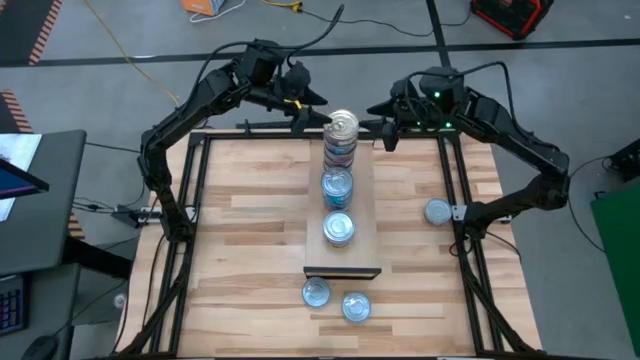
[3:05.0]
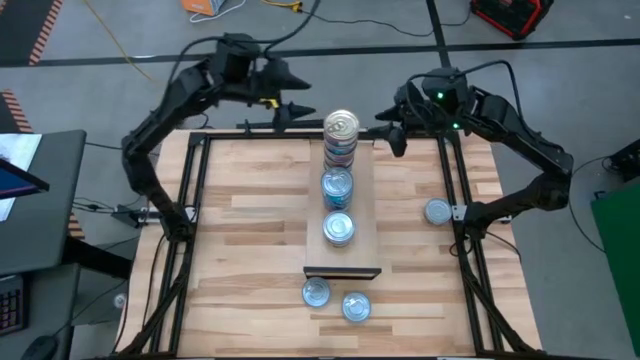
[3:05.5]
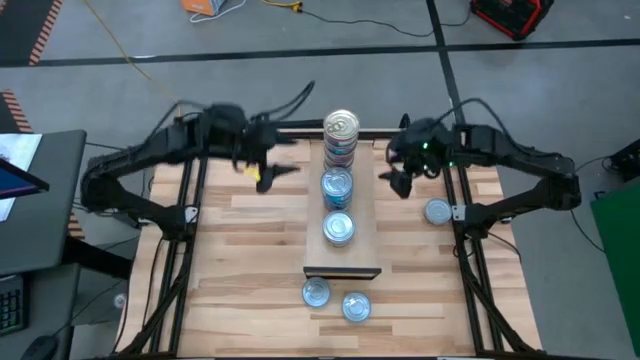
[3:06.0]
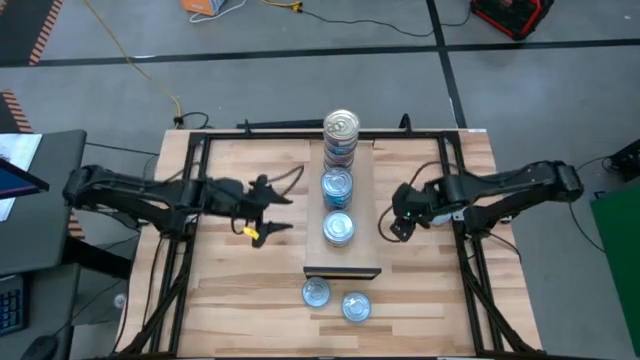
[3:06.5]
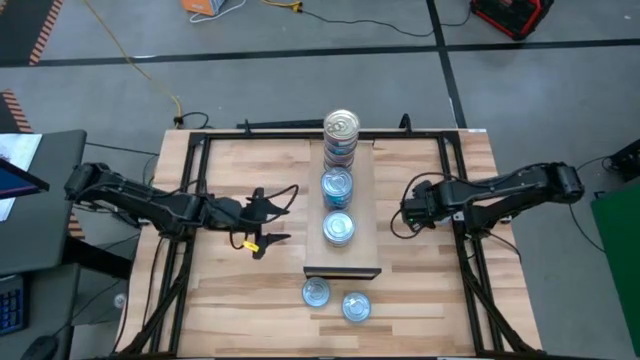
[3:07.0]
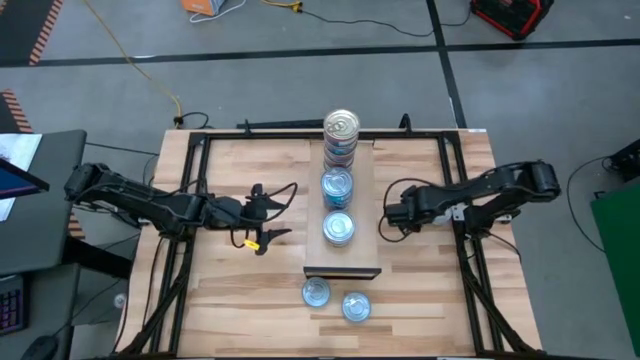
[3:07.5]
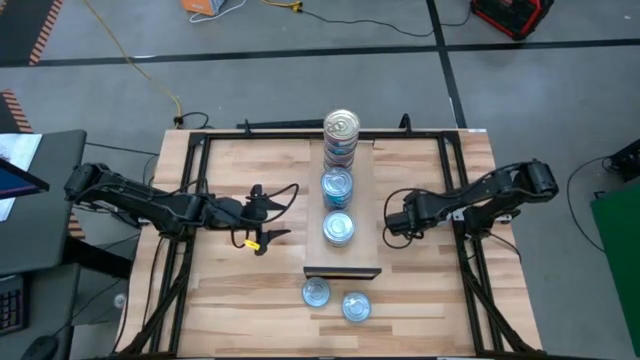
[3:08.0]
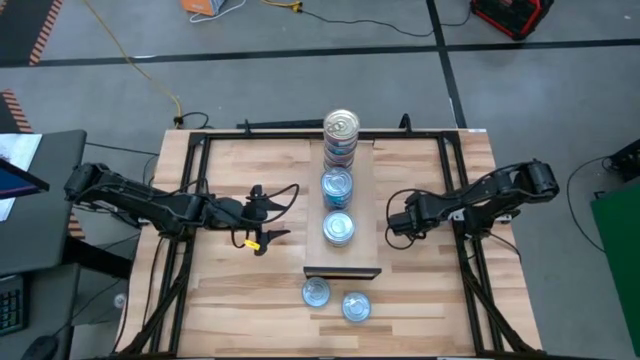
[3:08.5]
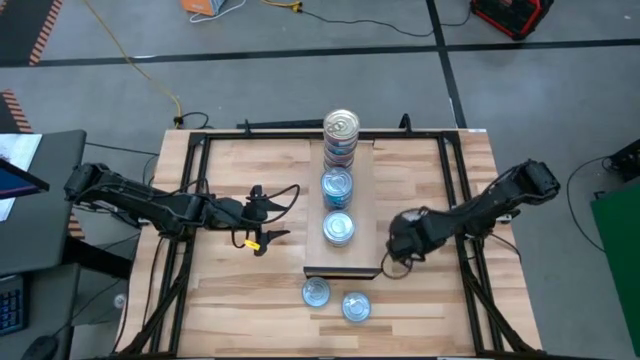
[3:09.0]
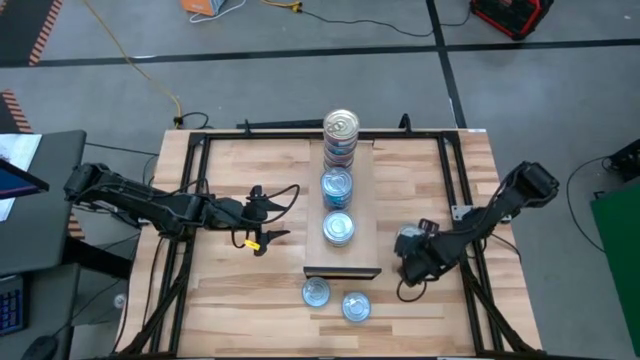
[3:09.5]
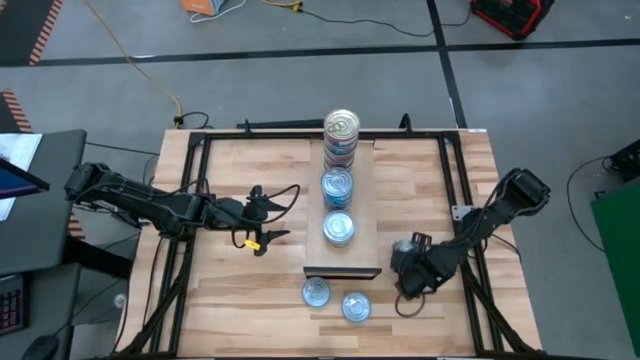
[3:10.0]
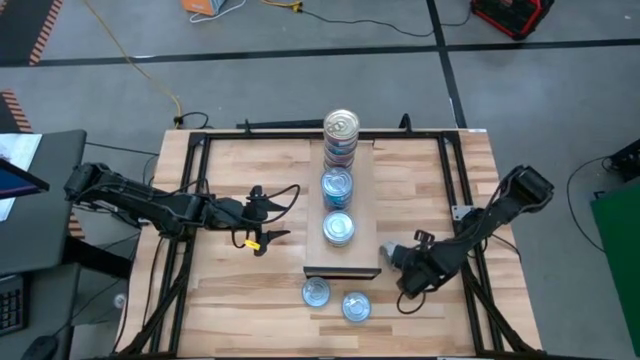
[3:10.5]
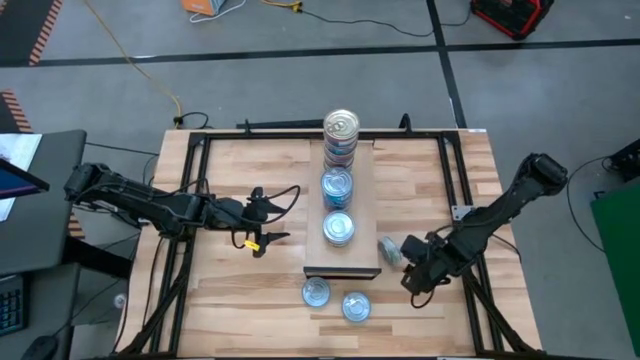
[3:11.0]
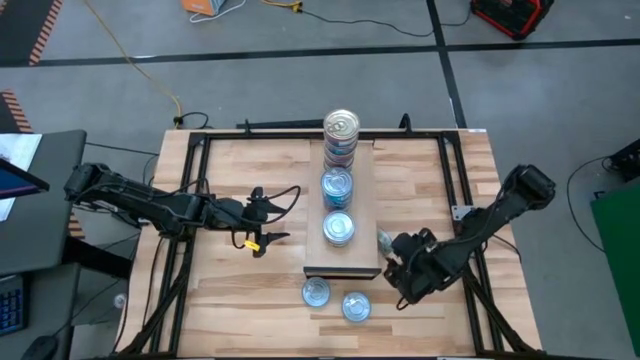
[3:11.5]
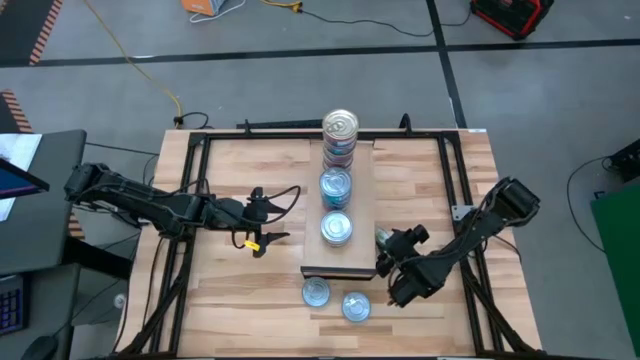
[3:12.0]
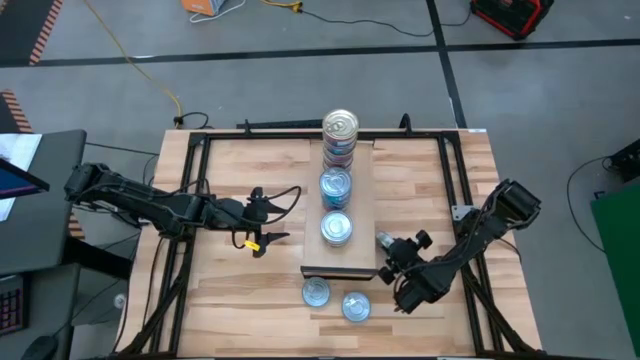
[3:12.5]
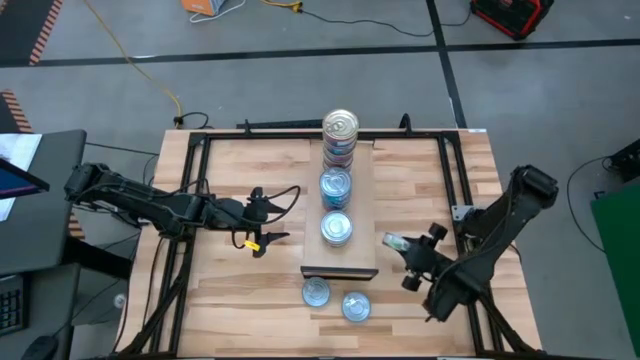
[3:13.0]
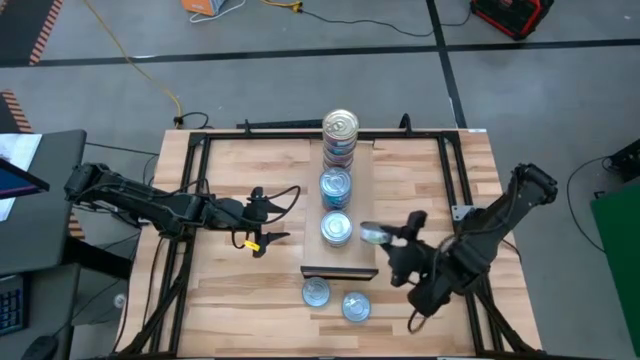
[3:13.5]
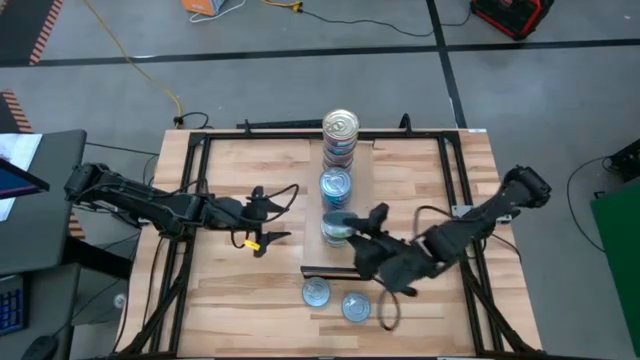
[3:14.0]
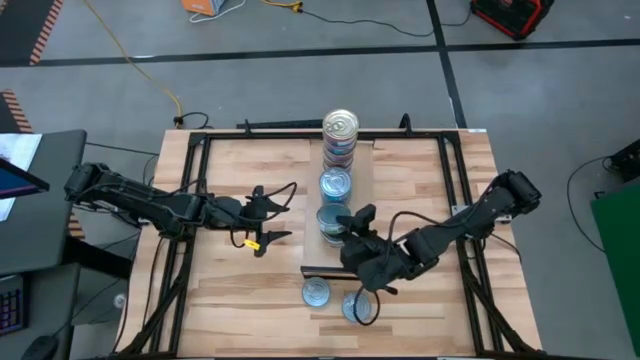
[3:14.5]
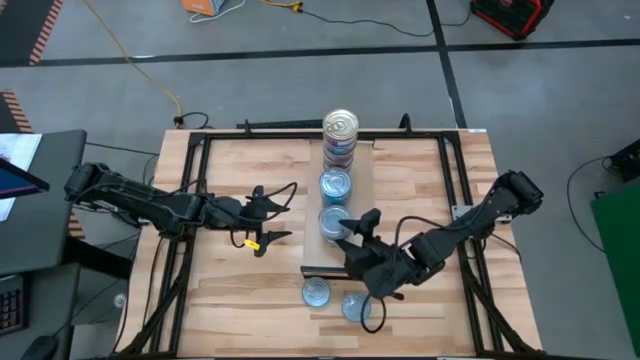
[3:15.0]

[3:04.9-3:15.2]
Task: Stack canned seafood by type on shelf
Stack the green and white tuna can on the shelf on top of the other green and white tuna can

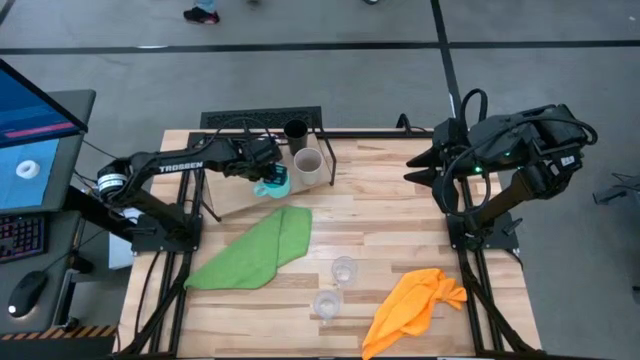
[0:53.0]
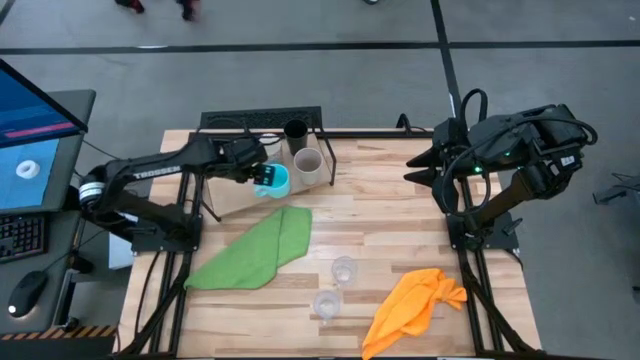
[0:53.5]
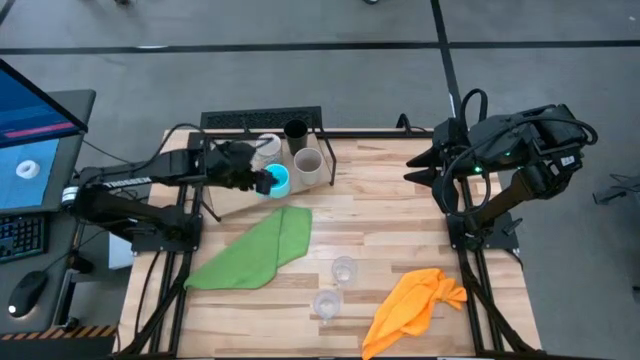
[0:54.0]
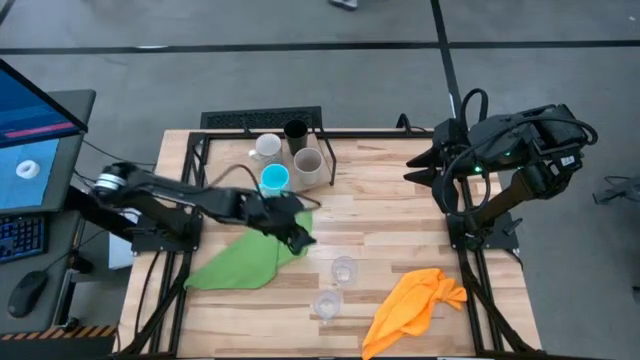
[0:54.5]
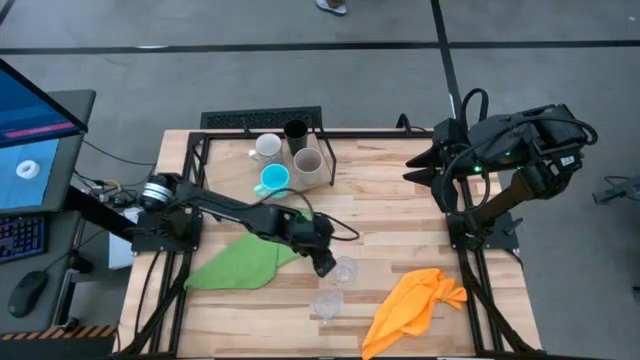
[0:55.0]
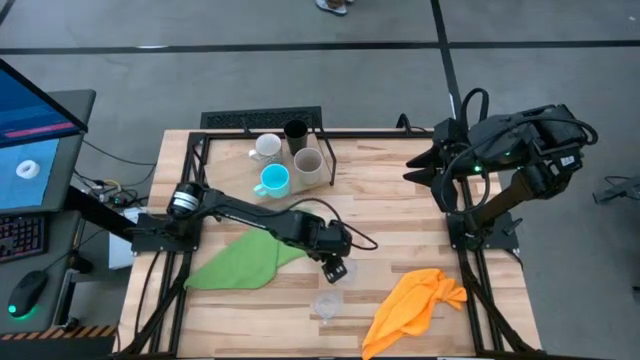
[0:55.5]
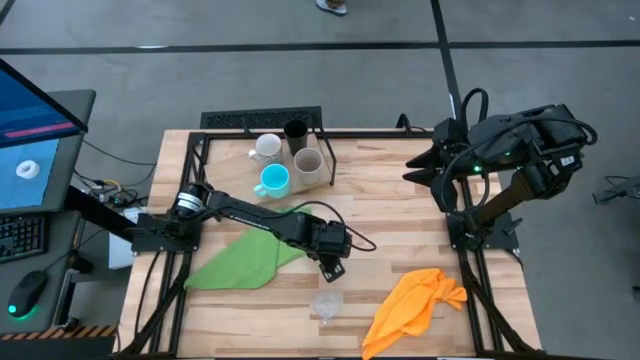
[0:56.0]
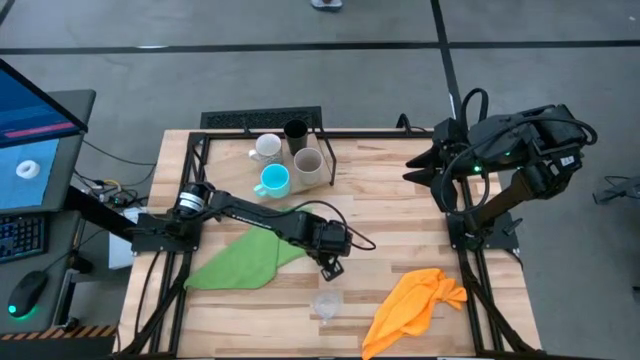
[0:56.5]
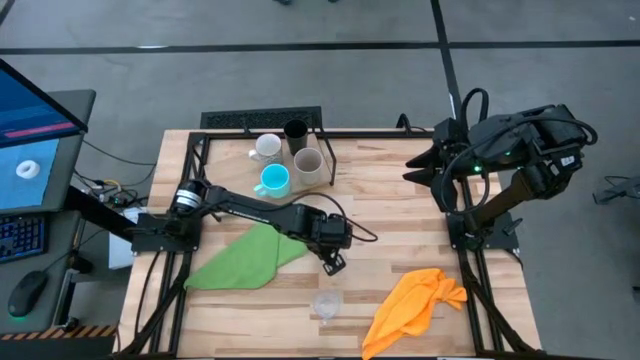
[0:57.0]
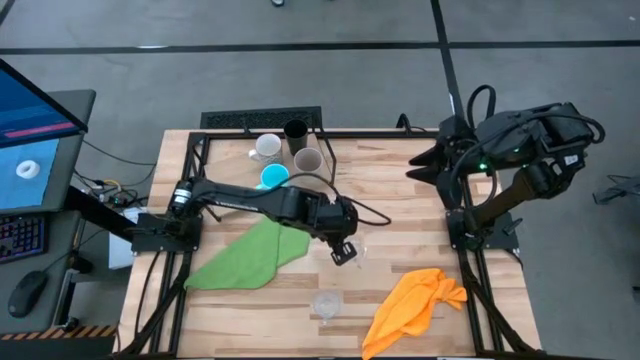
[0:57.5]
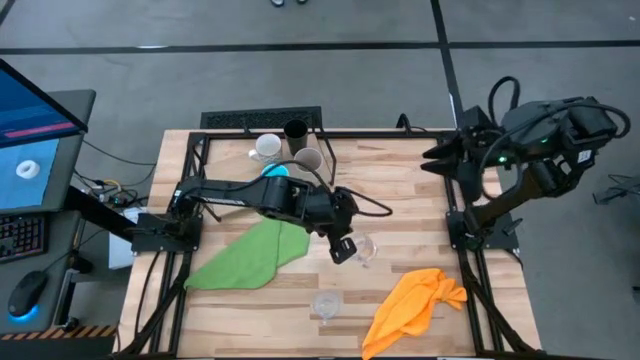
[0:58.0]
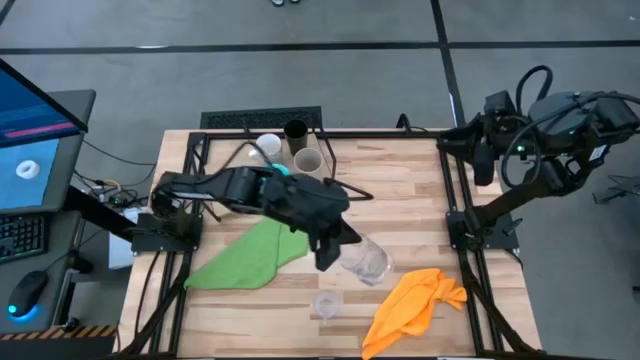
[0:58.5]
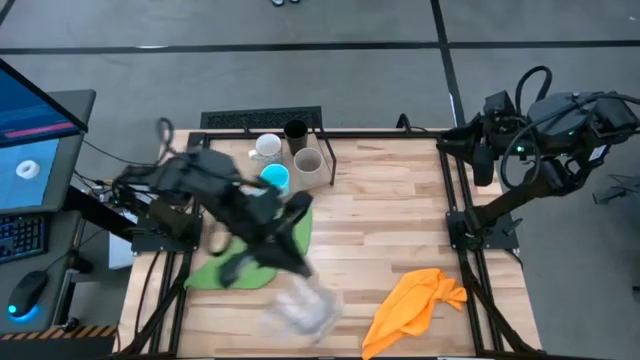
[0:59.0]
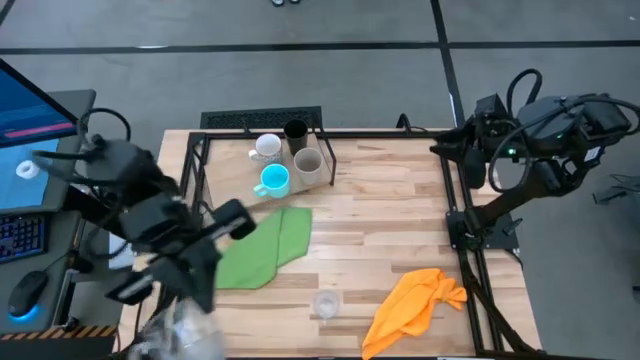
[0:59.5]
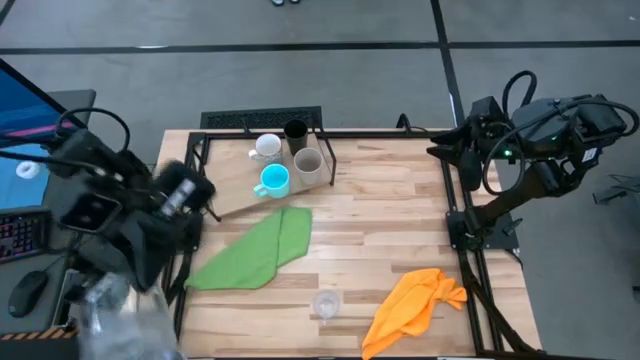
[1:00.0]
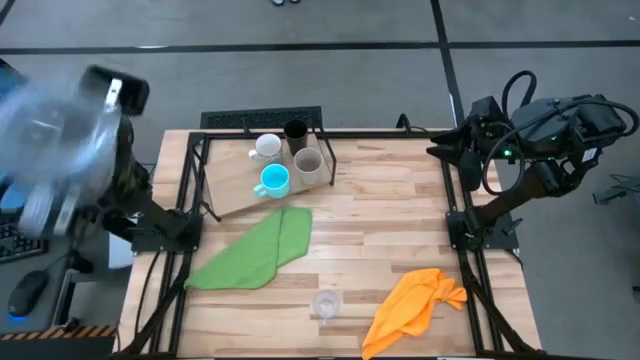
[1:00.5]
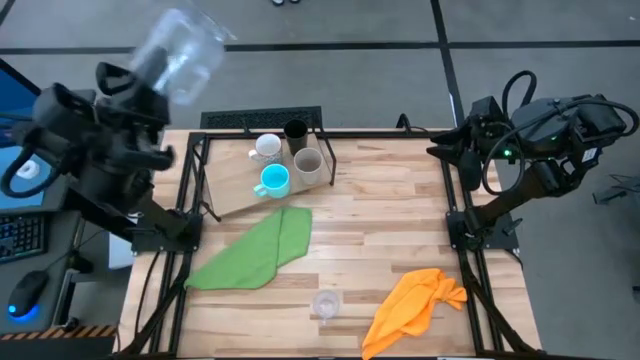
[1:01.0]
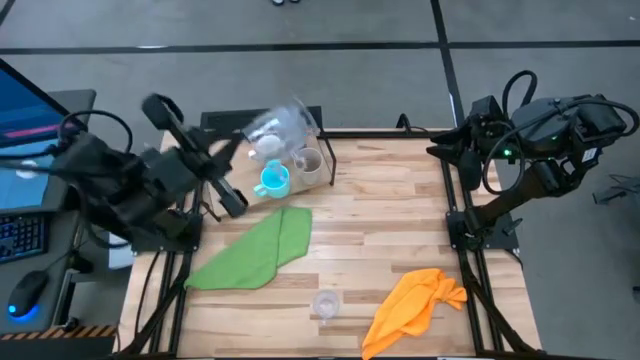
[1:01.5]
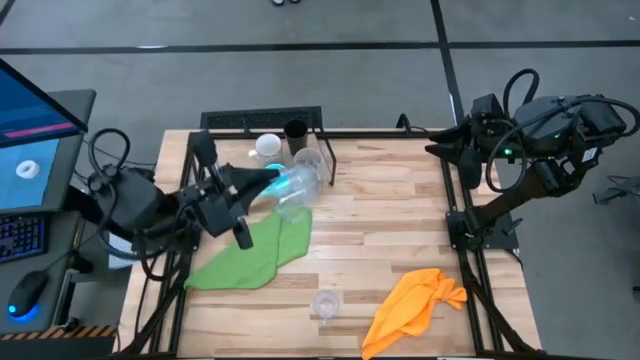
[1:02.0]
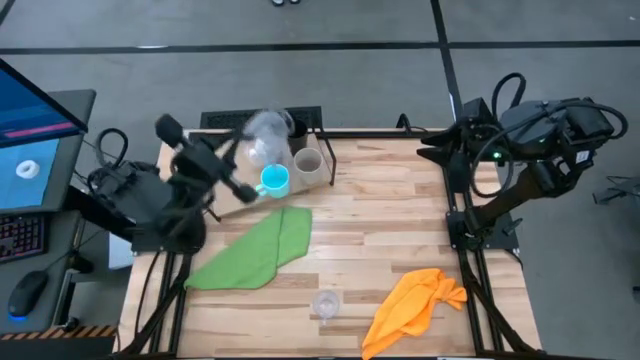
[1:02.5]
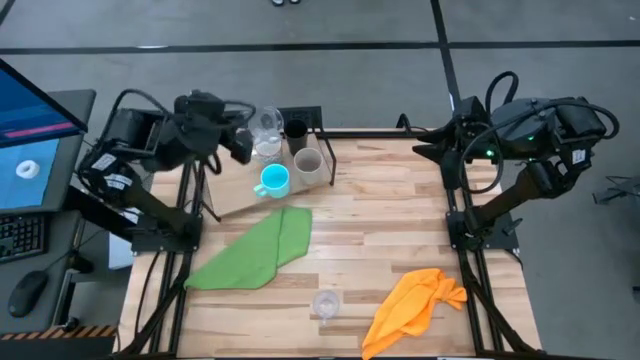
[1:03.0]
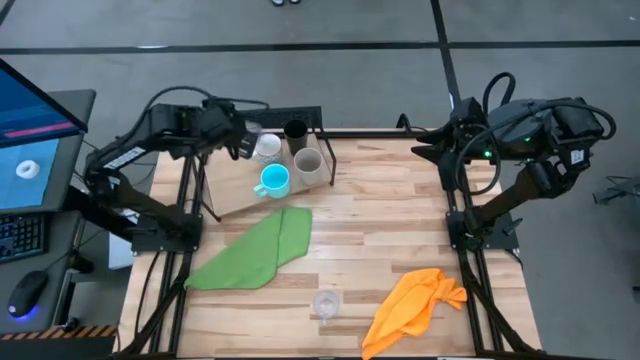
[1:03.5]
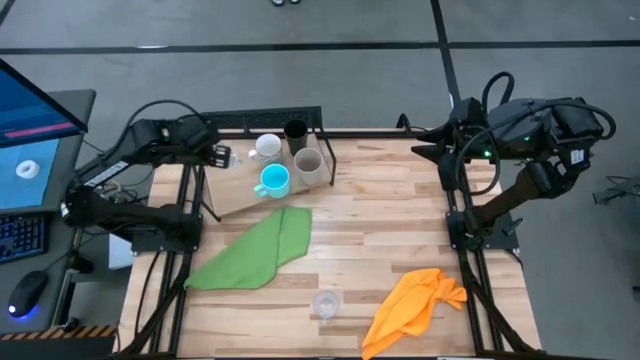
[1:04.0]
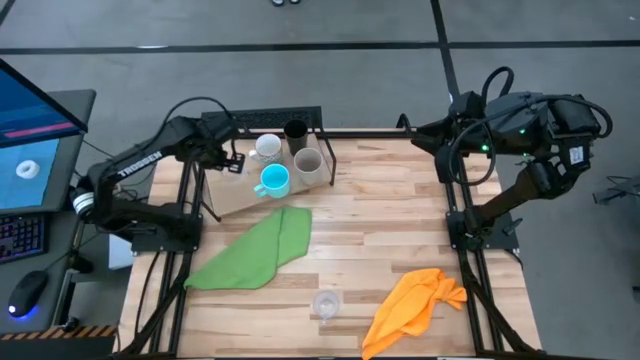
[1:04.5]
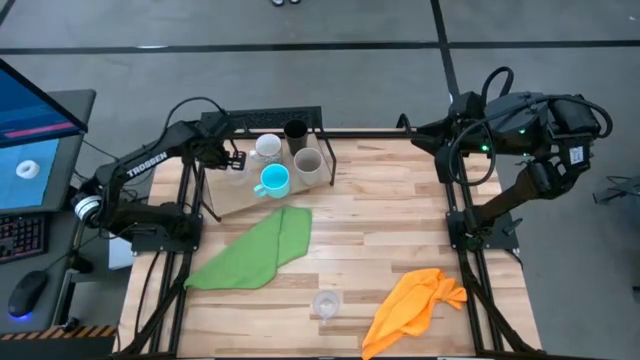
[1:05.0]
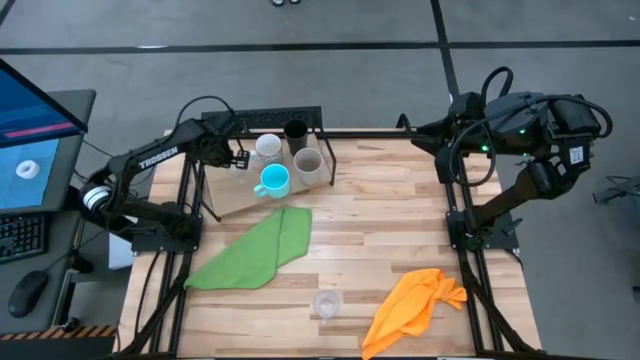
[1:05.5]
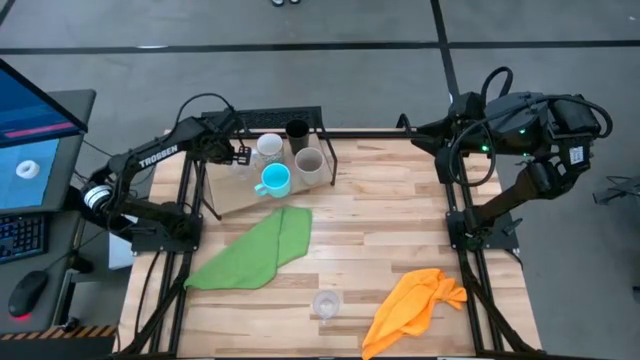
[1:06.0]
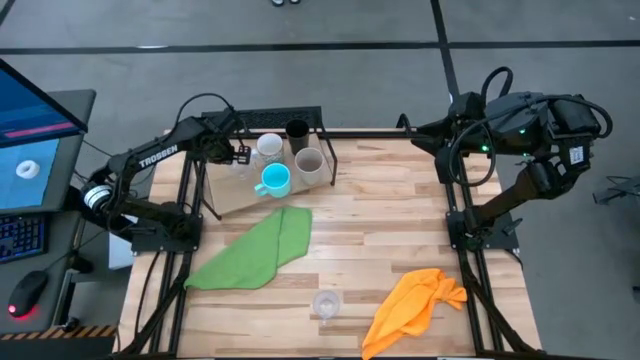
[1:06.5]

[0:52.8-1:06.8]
Task: Stack small to large cups/mugs on shelf
Put the transparent mug on the shelf
